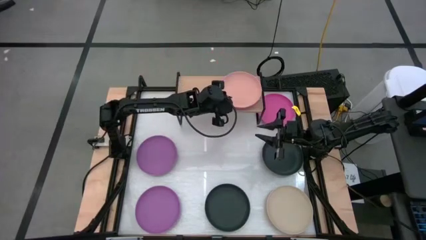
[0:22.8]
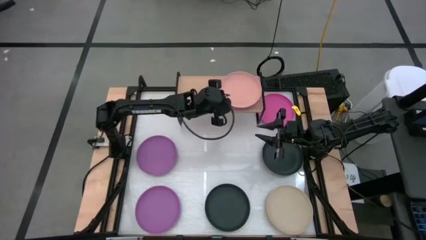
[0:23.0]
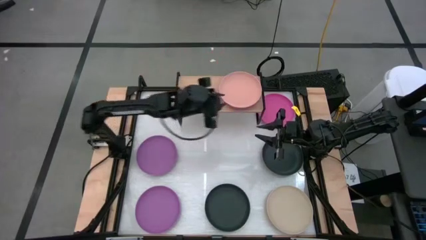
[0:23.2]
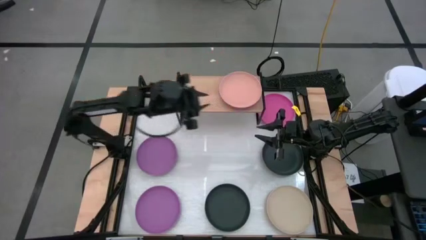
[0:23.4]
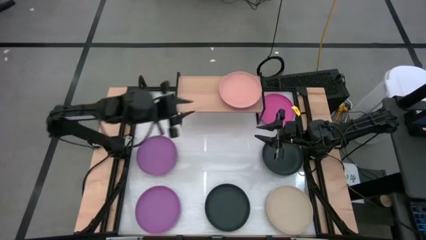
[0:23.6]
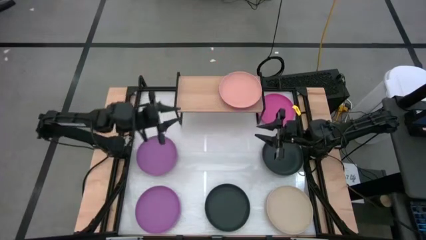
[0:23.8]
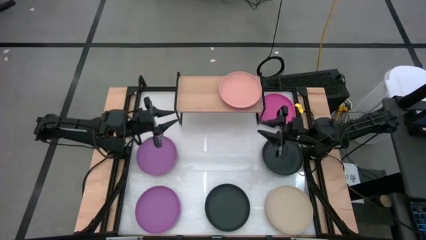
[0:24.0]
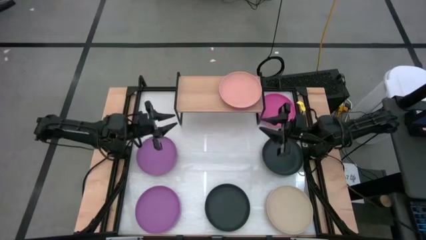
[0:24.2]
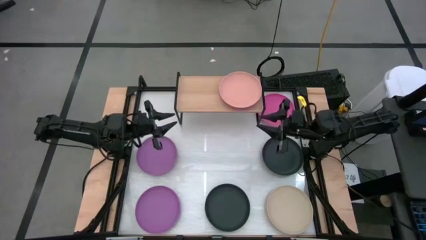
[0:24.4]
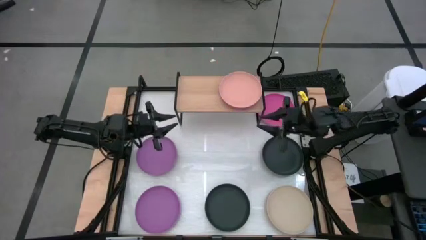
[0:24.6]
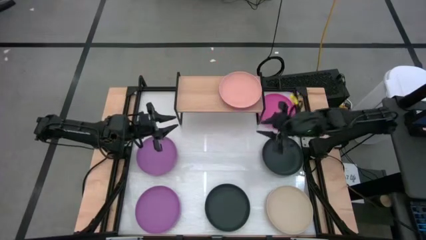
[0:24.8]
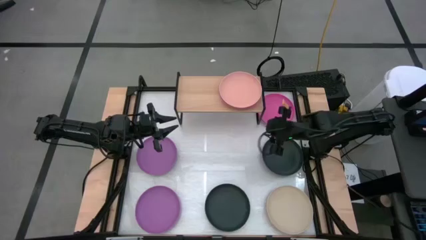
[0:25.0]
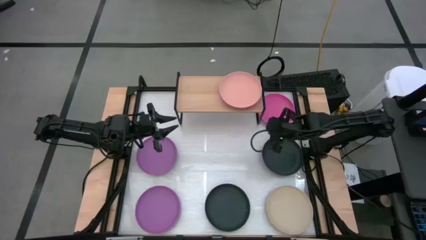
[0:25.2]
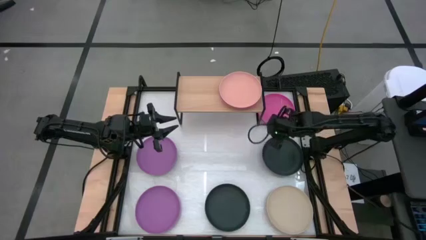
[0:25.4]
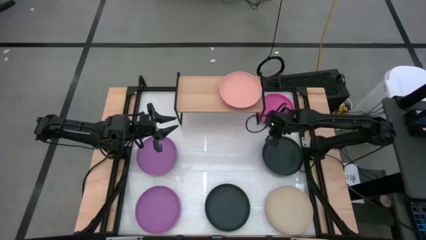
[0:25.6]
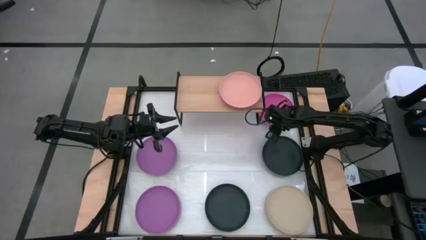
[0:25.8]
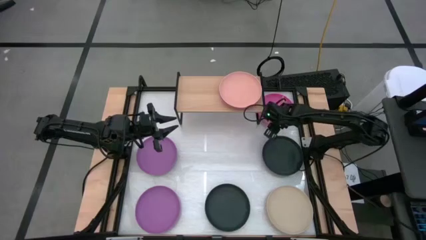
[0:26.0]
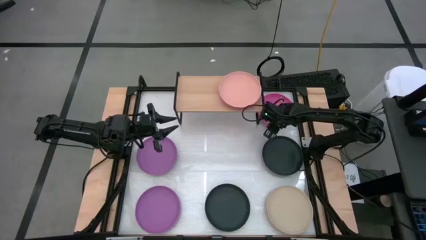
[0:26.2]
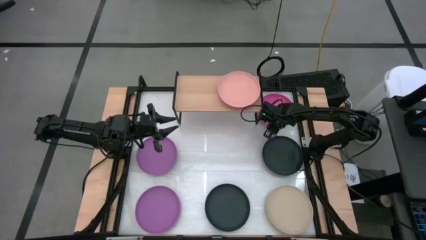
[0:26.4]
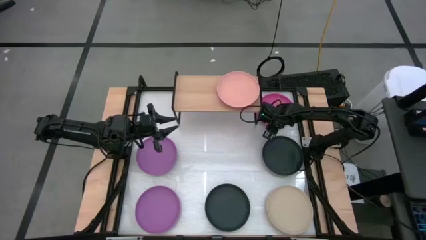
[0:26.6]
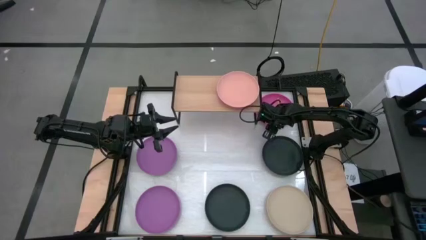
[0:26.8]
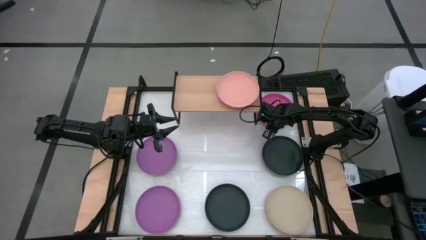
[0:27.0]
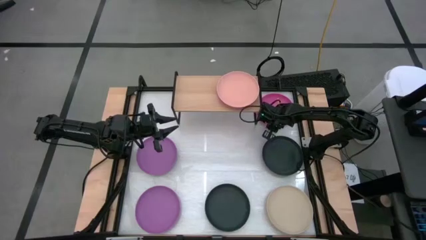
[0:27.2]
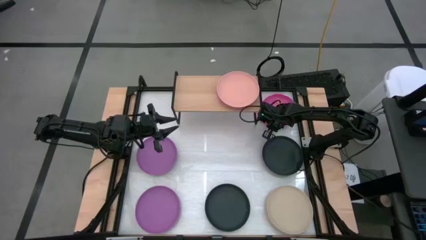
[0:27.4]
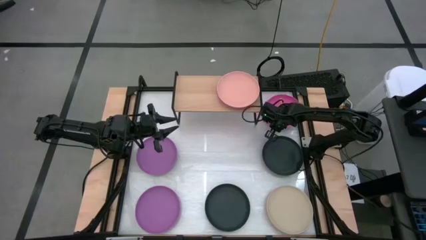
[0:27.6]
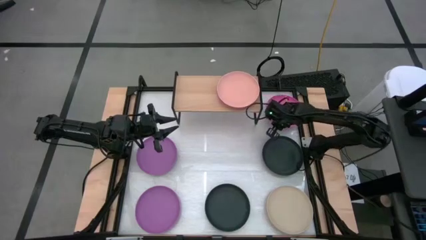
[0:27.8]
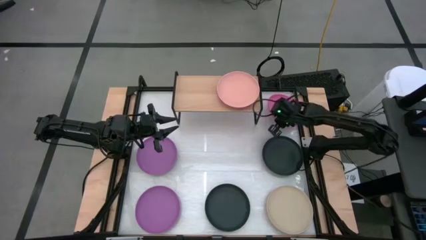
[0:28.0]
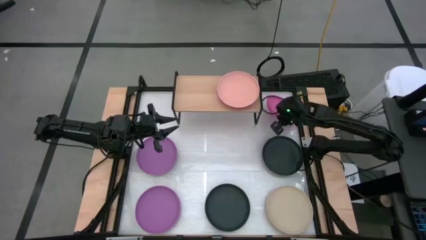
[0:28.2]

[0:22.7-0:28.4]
Task: Place and stack plates onto a shelf
Stack the pink plate on top of the light orange plate on the shelf

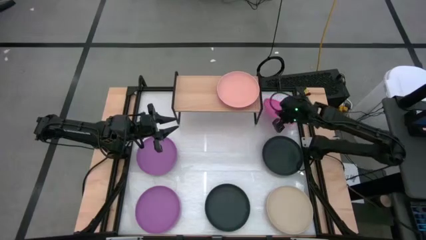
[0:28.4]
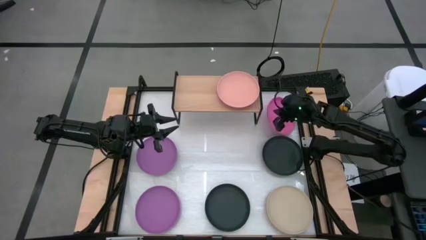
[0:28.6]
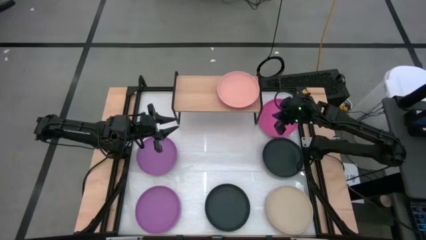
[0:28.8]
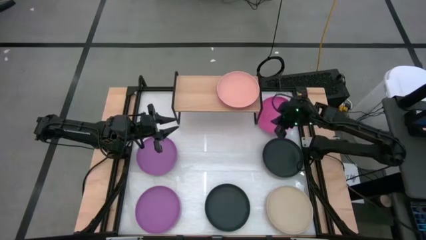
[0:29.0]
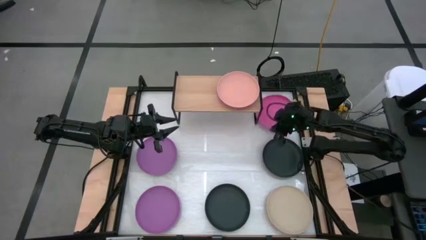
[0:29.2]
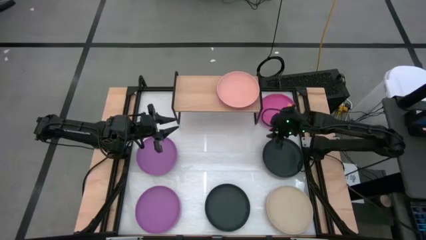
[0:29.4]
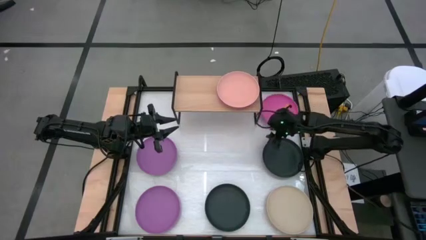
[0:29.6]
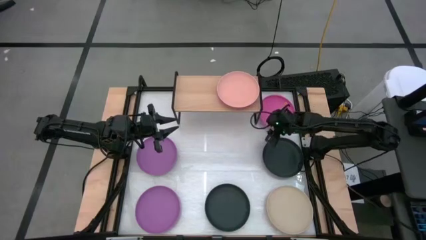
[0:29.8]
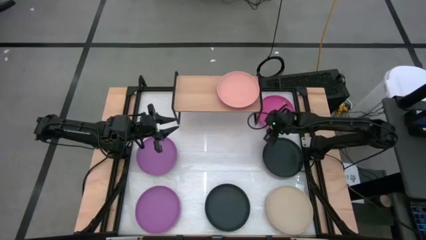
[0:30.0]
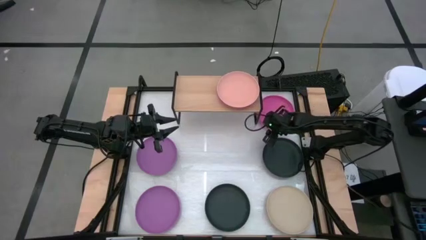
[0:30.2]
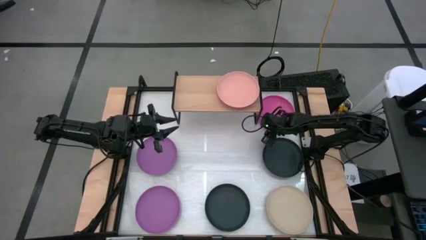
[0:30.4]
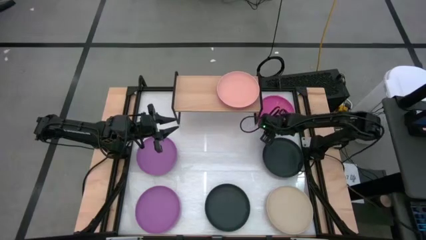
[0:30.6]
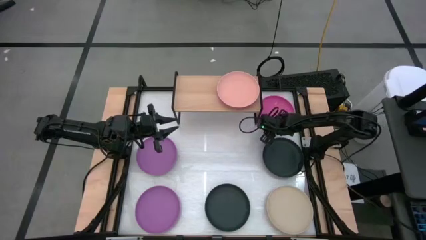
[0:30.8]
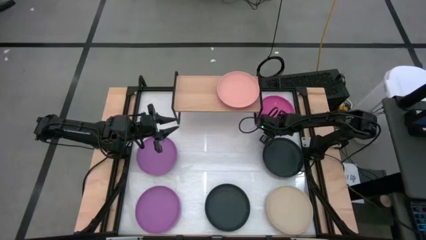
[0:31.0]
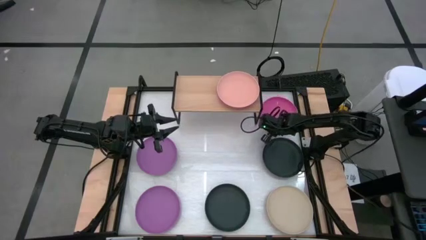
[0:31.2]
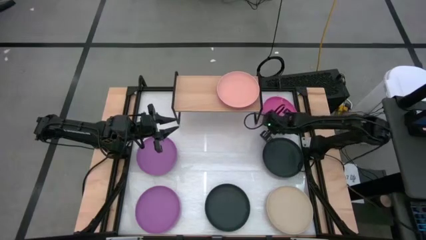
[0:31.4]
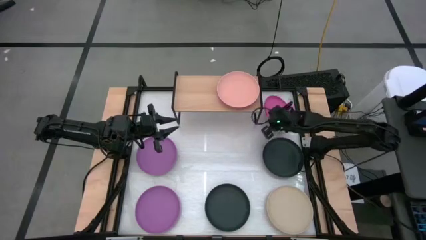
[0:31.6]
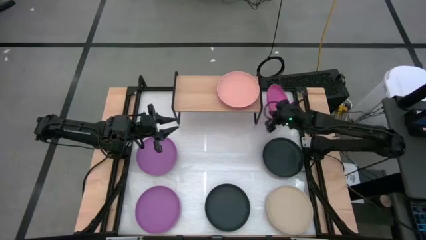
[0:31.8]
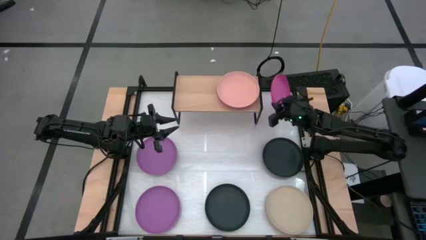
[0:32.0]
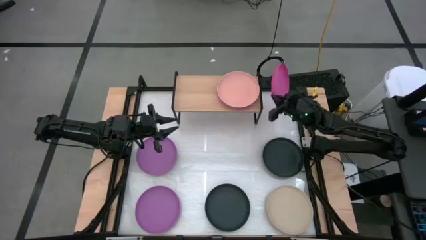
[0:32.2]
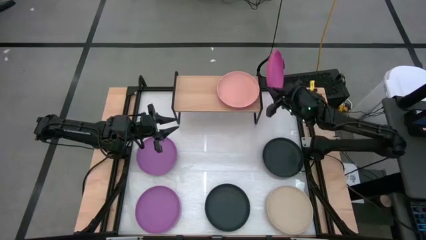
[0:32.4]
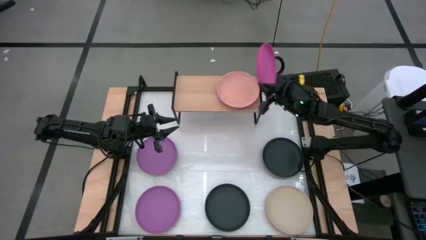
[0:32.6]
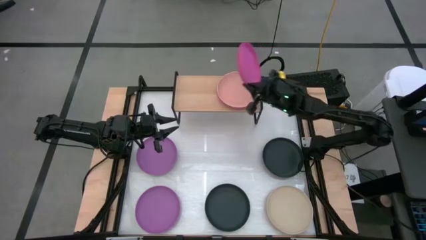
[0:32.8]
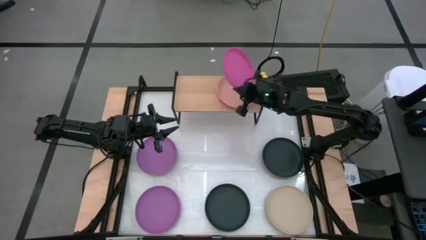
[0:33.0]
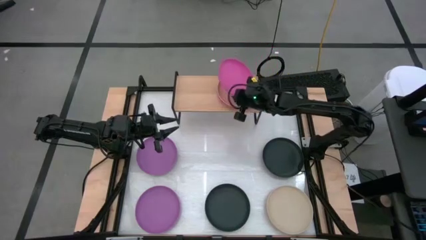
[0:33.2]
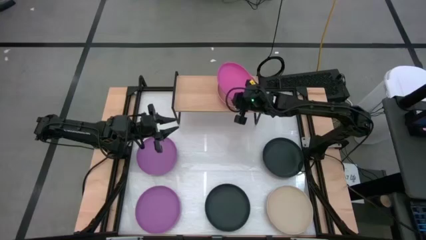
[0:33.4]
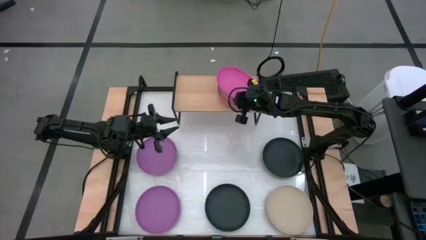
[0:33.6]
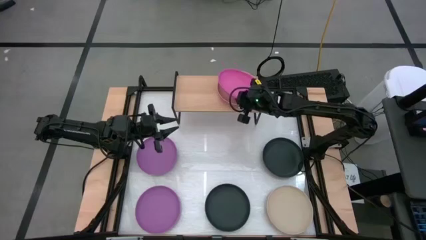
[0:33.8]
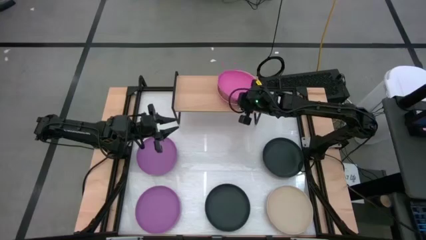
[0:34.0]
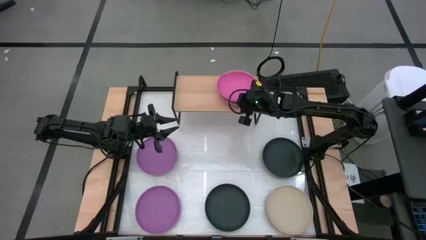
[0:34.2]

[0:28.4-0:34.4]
Stack the pink plate on top of the light orange plate on the shelf

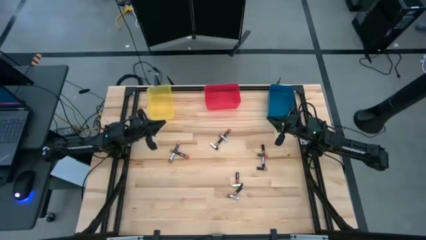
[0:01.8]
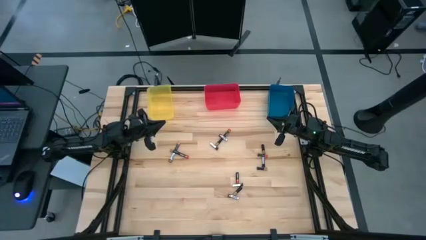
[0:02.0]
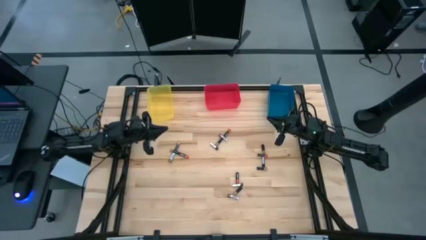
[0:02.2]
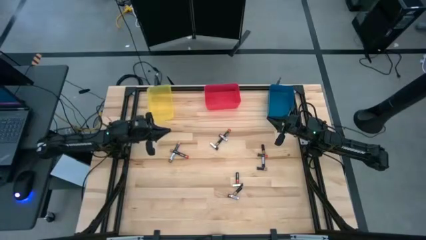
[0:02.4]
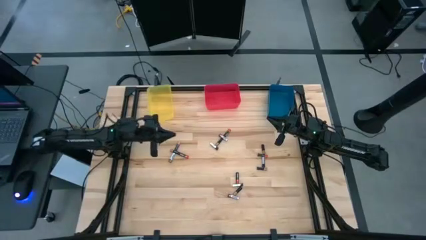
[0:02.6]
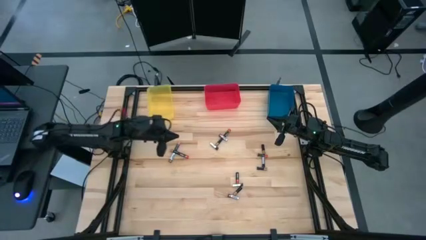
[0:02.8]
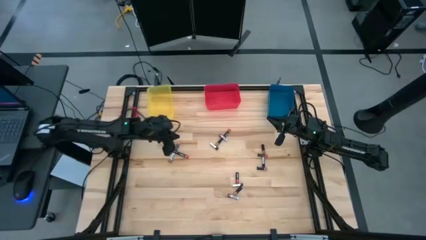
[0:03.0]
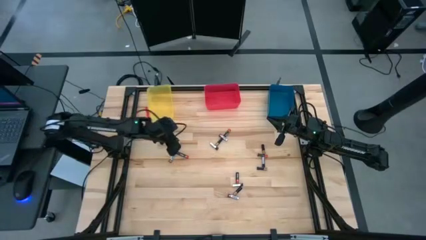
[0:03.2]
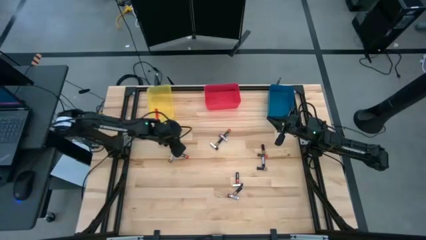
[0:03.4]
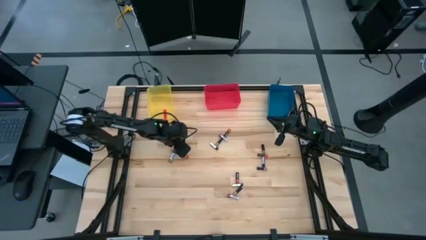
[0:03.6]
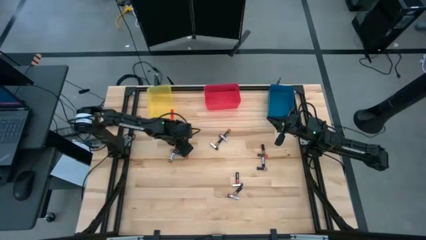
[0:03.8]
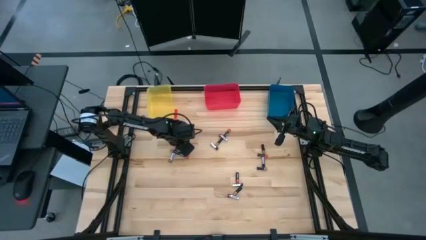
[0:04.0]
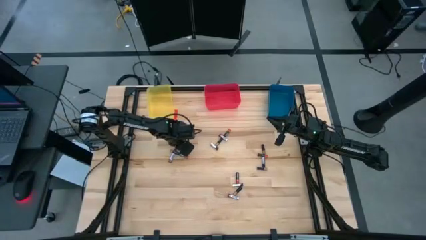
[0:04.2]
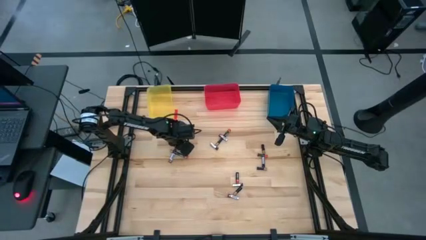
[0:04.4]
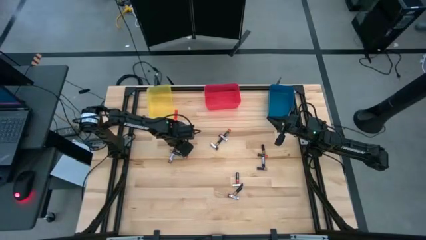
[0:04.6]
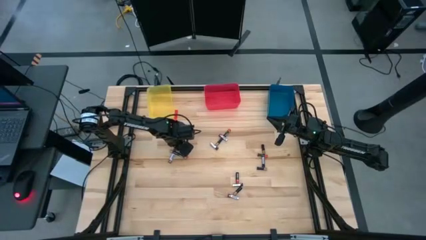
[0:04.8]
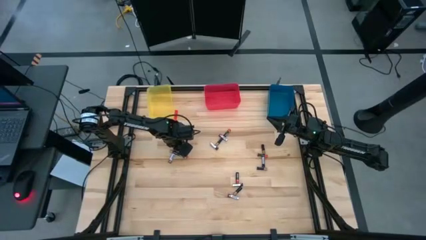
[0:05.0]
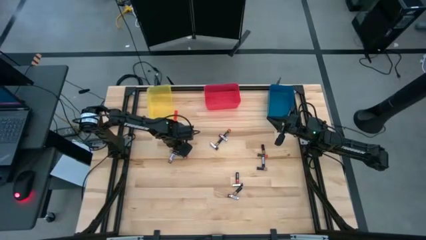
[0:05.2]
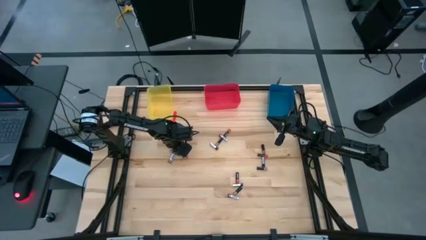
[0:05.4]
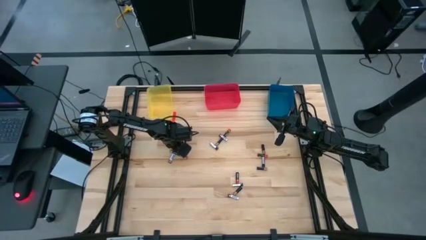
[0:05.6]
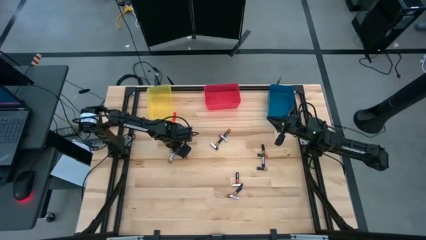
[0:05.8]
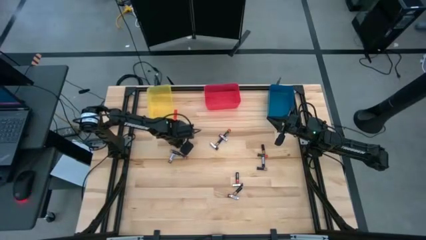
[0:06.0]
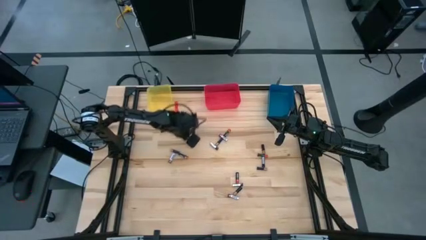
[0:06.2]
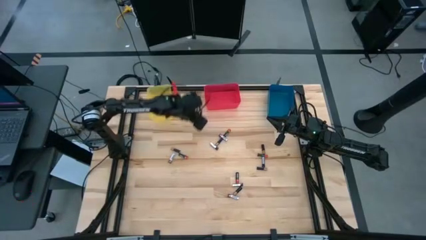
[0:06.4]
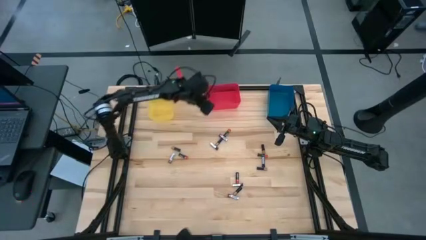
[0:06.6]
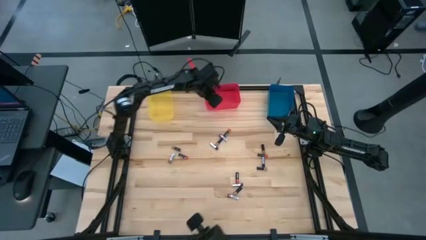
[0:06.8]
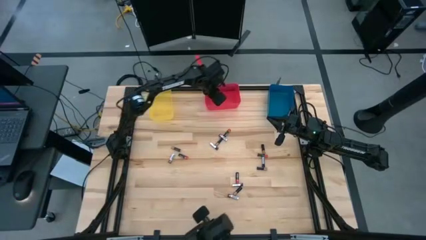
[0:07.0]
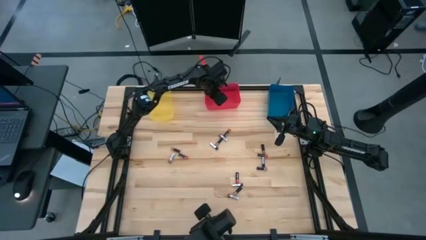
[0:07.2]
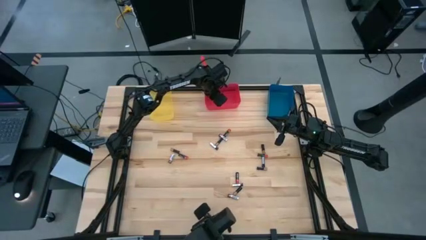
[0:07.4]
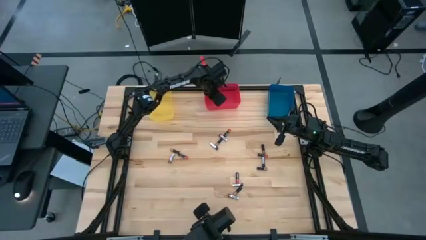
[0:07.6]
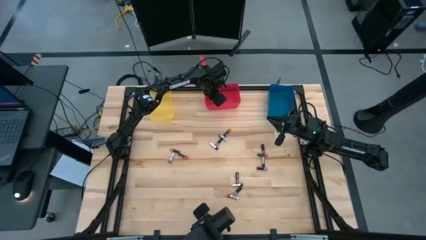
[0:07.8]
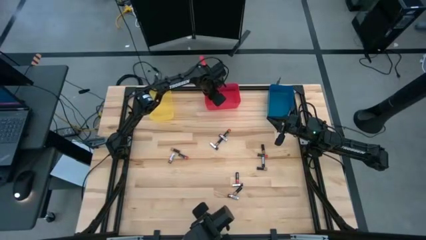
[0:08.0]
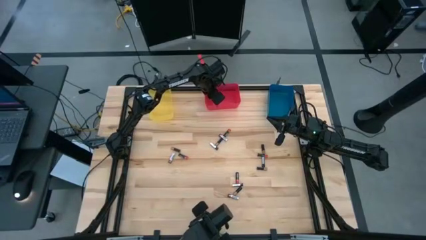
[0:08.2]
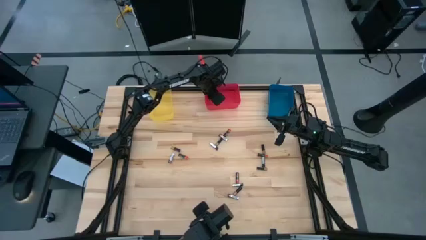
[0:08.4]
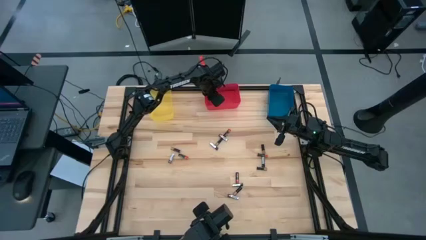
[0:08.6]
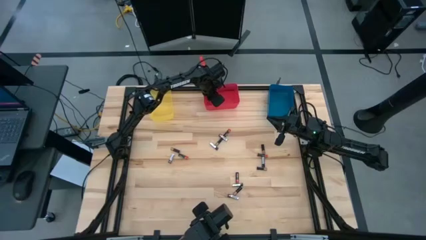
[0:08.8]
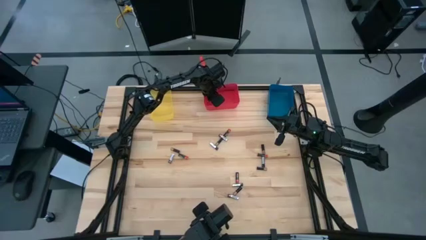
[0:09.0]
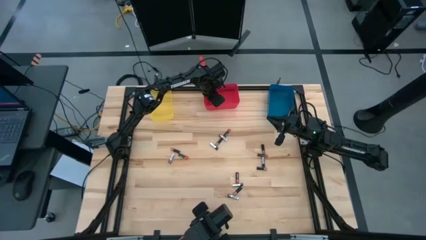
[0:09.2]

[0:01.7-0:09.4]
Task: Sort batteries
Put the brown battery into the red bin
